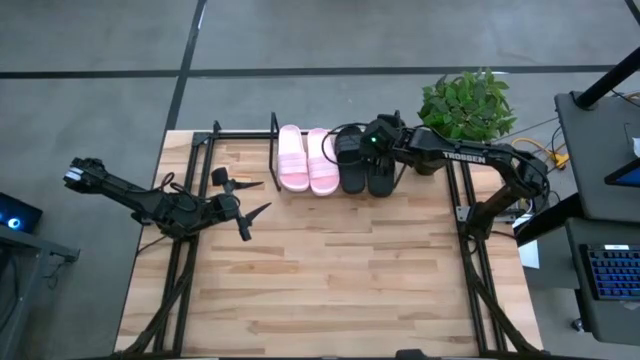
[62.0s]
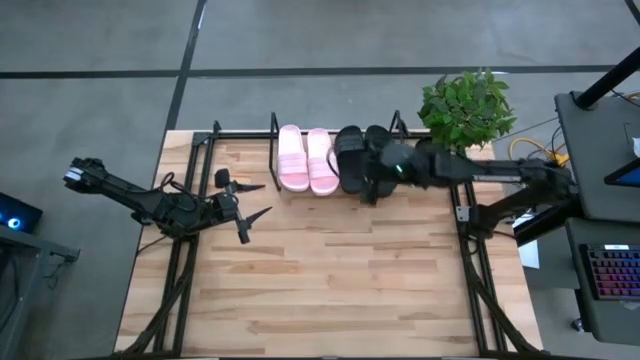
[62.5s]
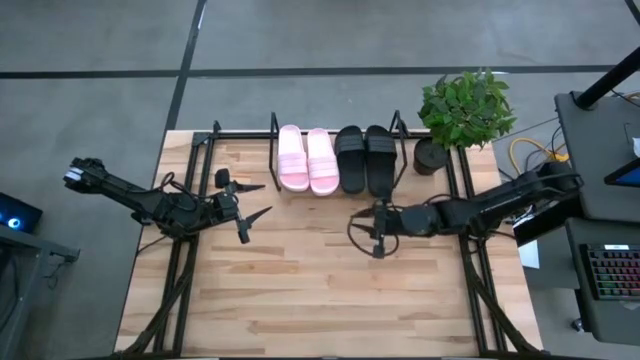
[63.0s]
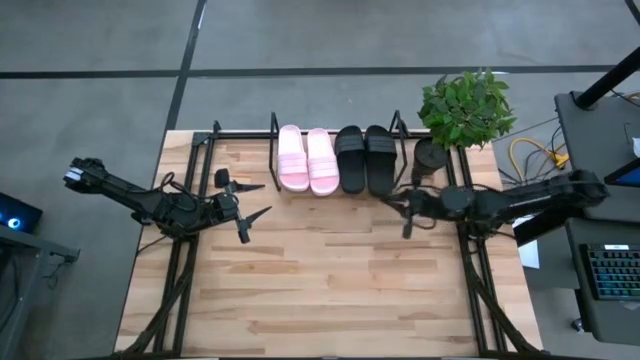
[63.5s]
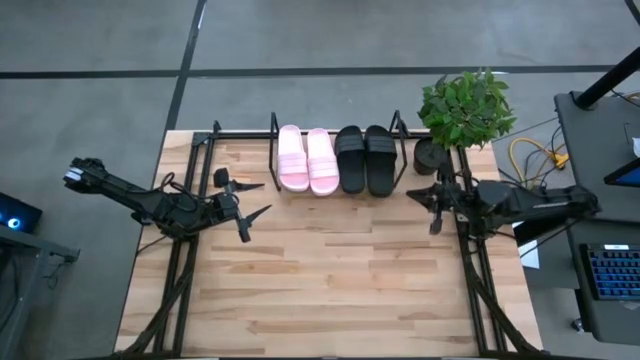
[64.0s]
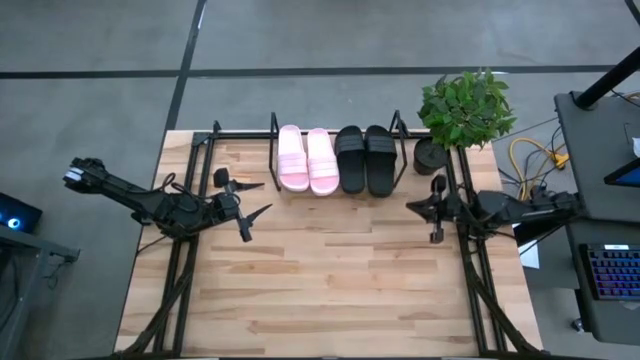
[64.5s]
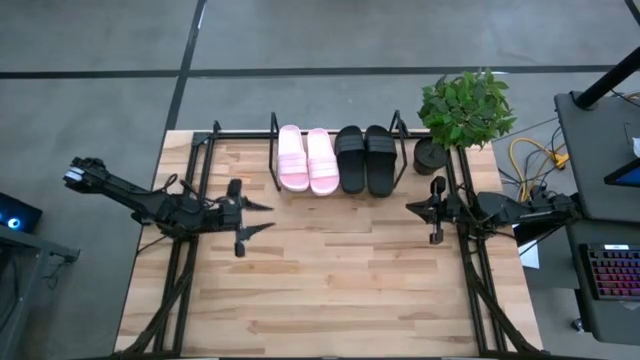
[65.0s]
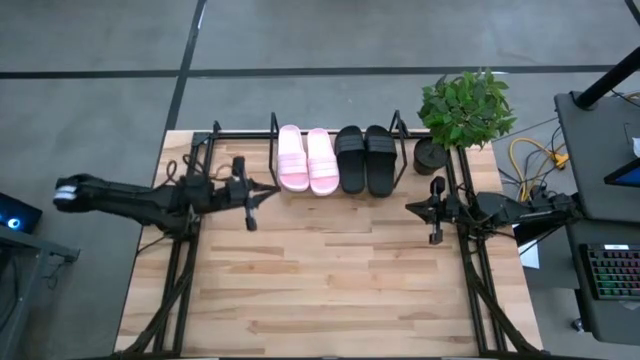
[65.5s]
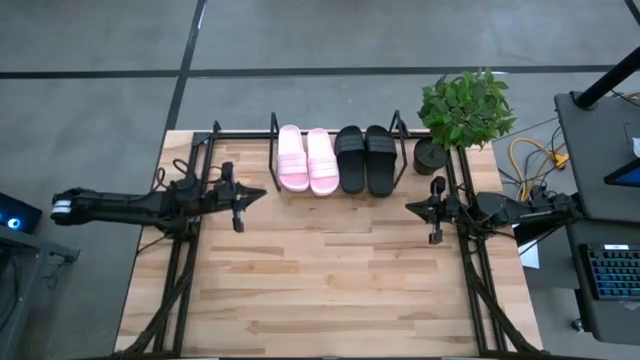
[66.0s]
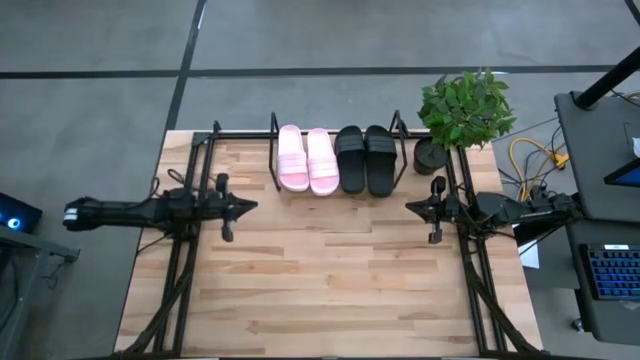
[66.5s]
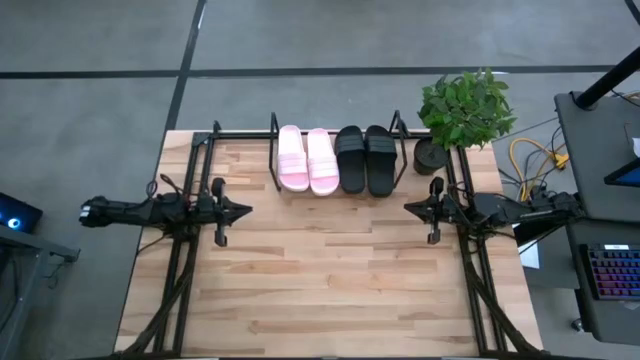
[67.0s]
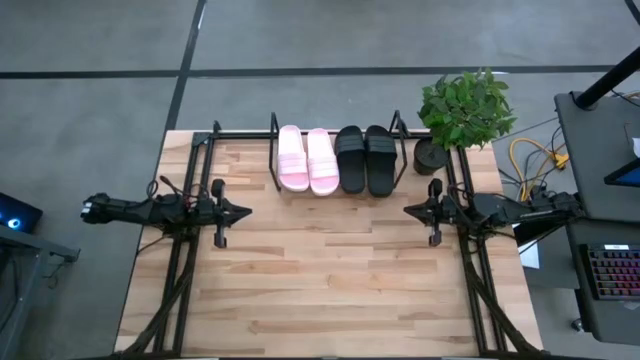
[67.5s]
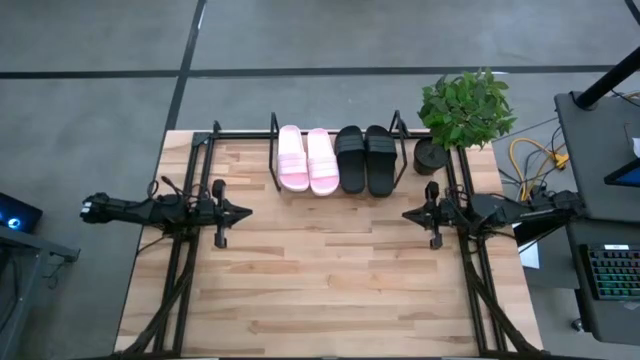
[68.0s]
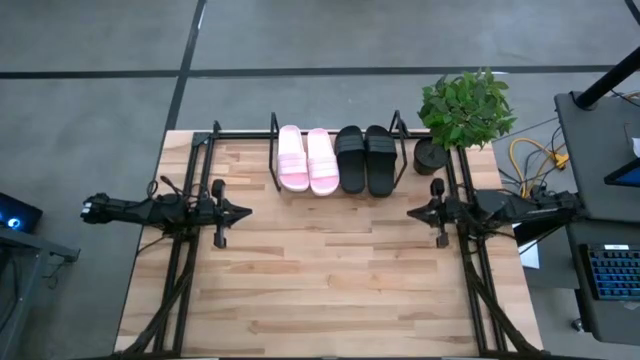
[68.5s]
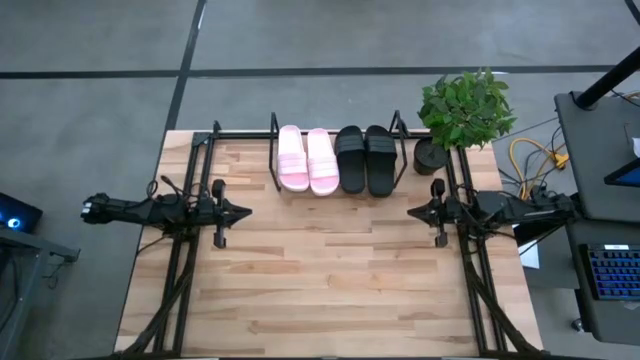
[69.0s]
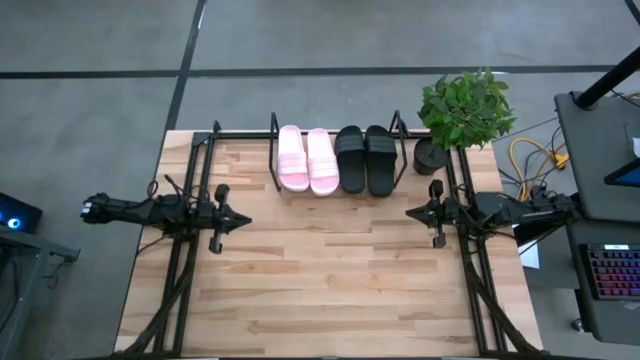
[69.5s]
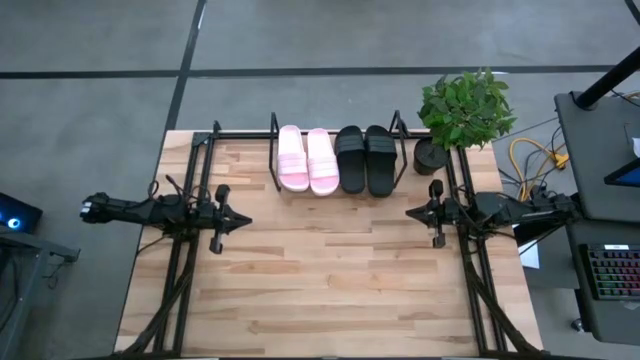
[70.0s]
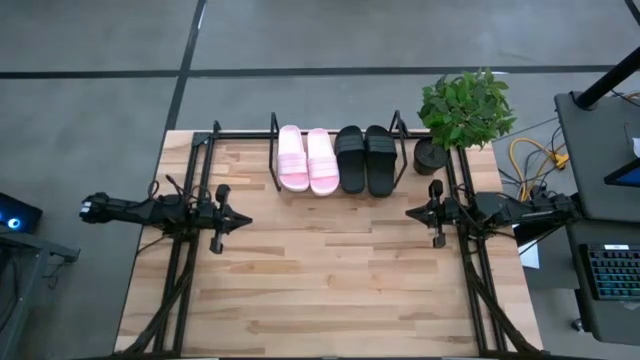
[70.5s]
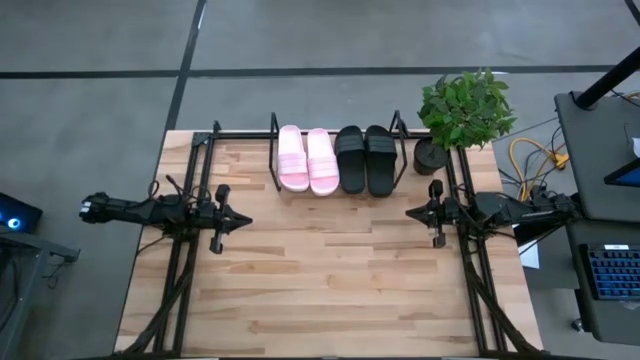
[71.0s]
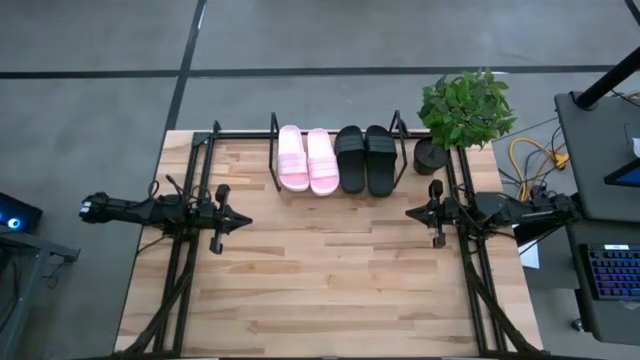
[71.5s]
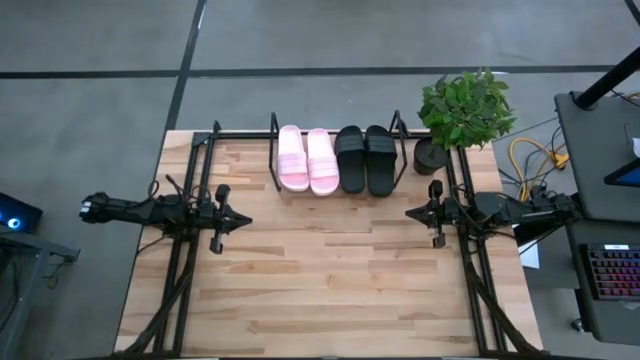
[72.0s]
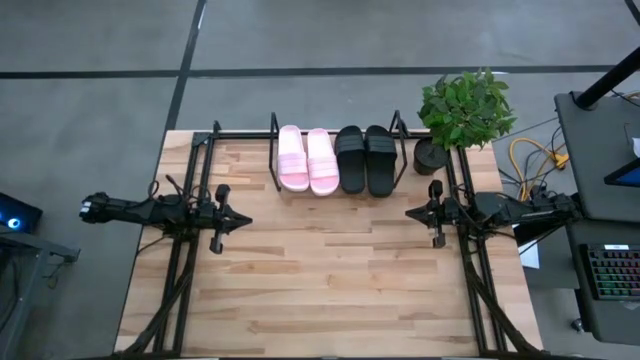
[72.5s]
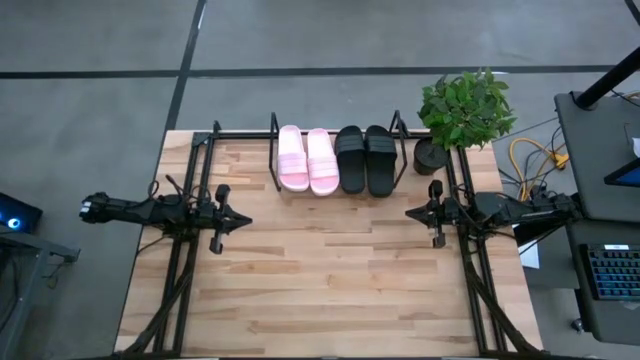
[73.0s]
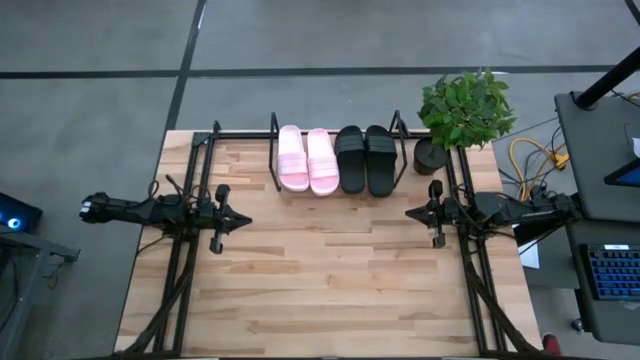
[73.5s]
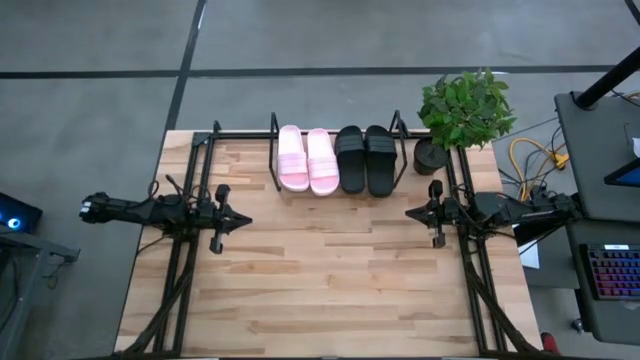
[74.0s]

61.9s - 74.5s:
Task: Pick and place slides into the shelf
Return to Home Position

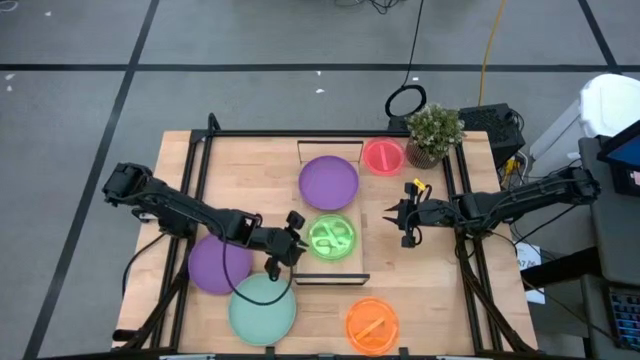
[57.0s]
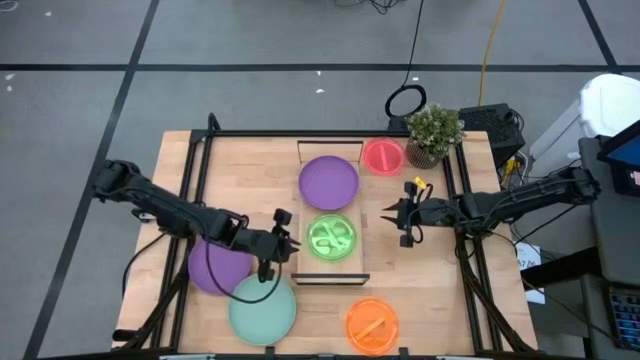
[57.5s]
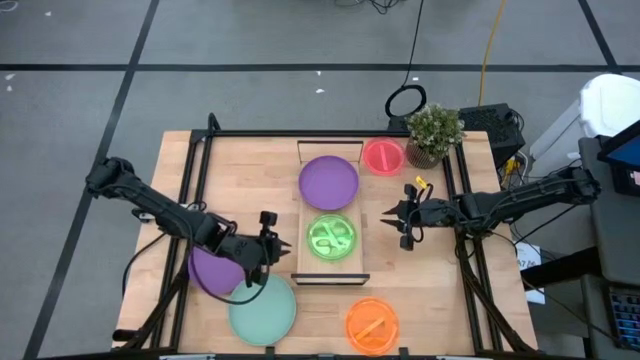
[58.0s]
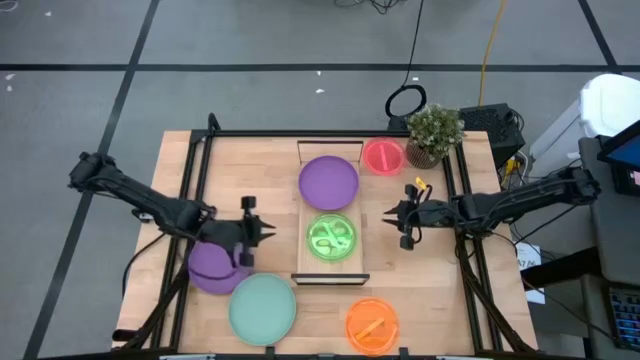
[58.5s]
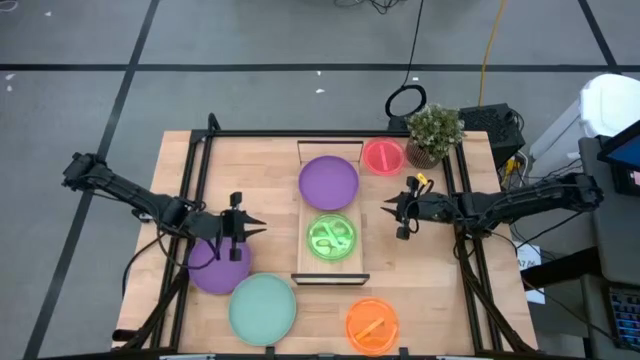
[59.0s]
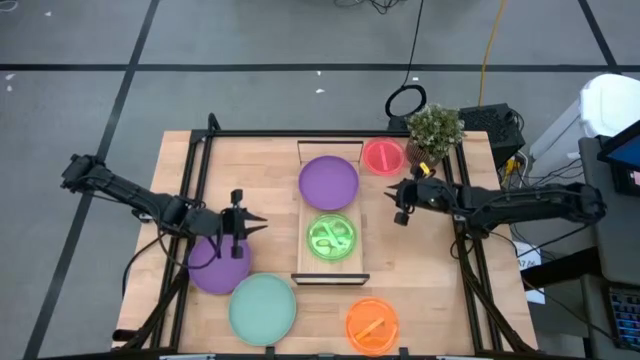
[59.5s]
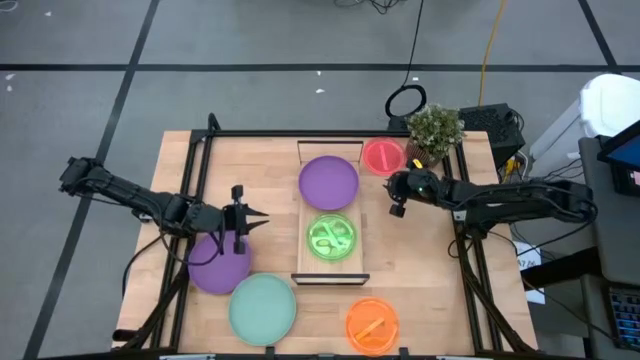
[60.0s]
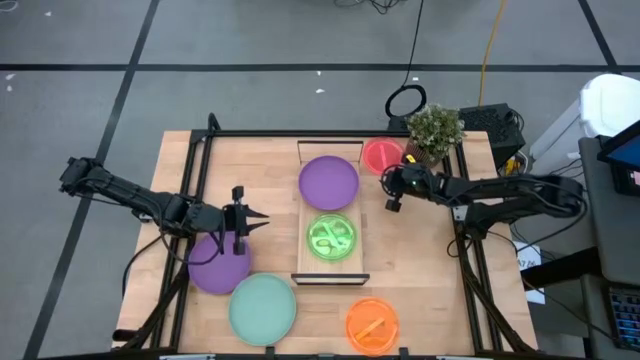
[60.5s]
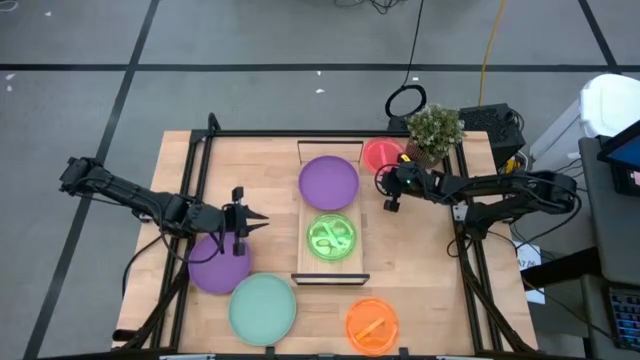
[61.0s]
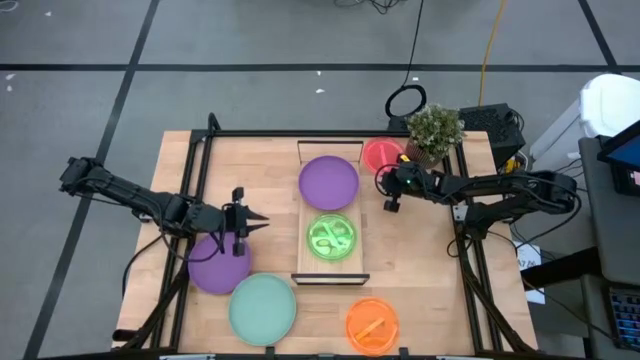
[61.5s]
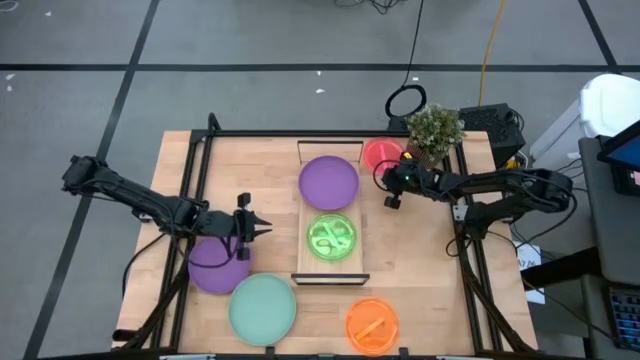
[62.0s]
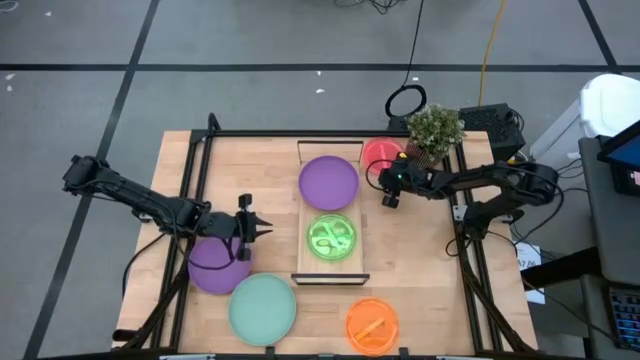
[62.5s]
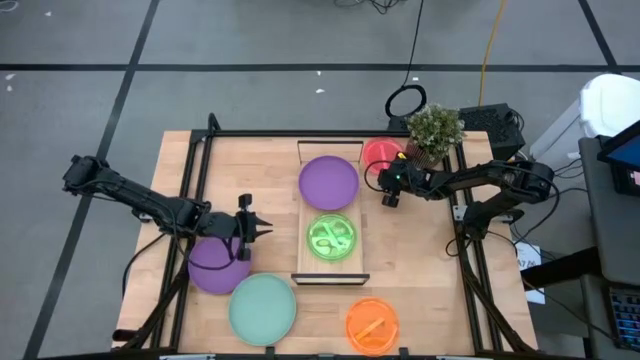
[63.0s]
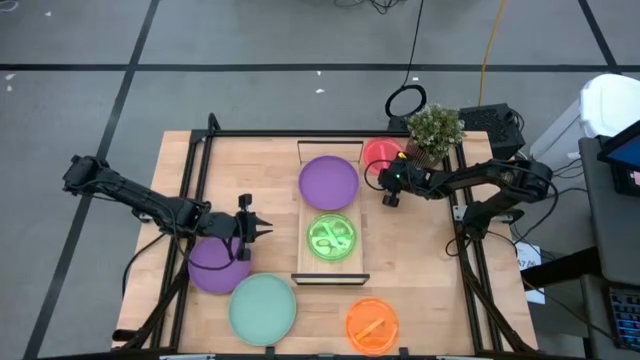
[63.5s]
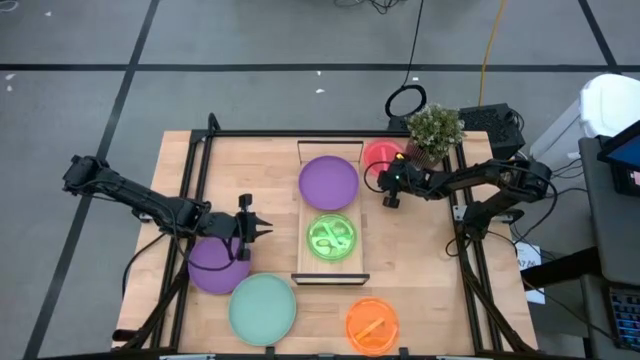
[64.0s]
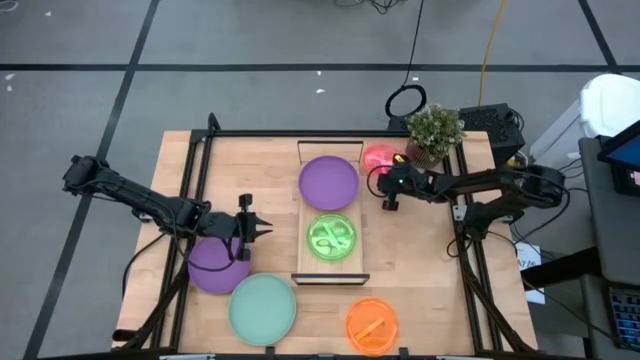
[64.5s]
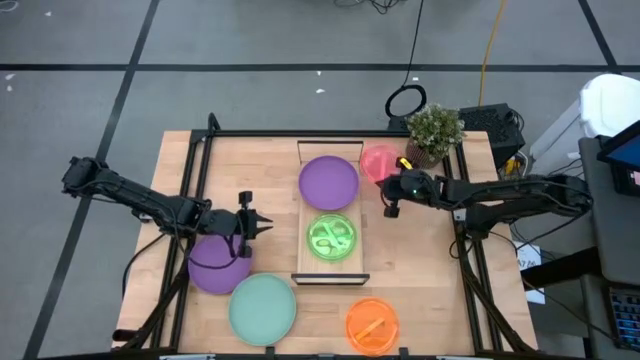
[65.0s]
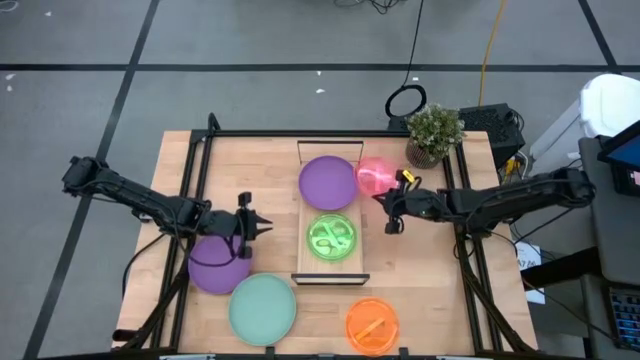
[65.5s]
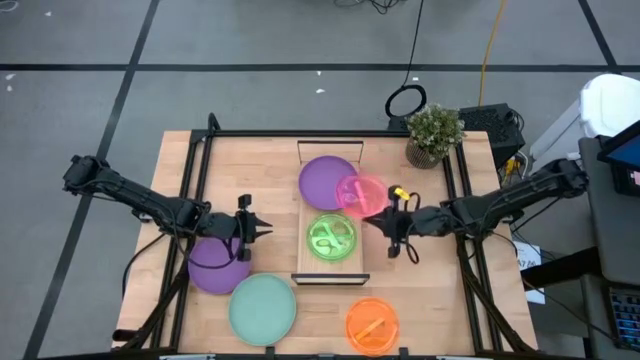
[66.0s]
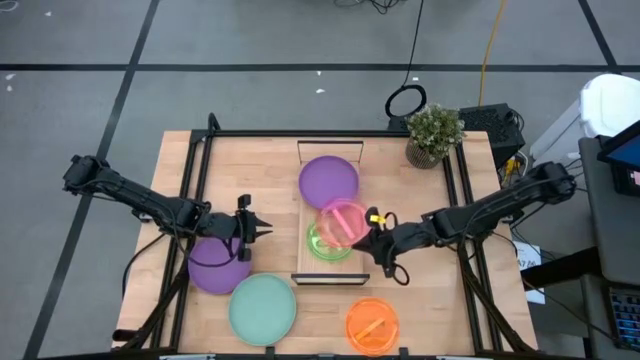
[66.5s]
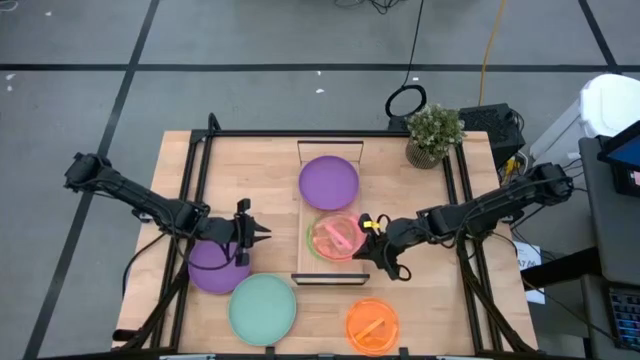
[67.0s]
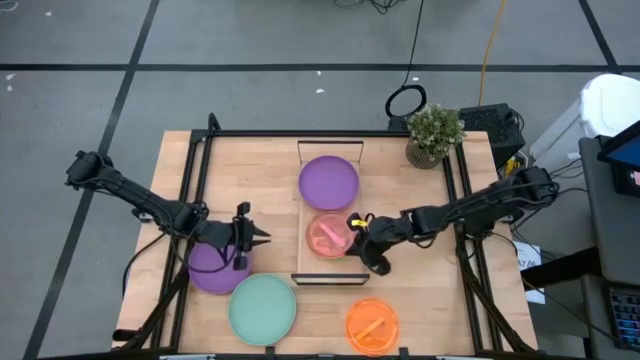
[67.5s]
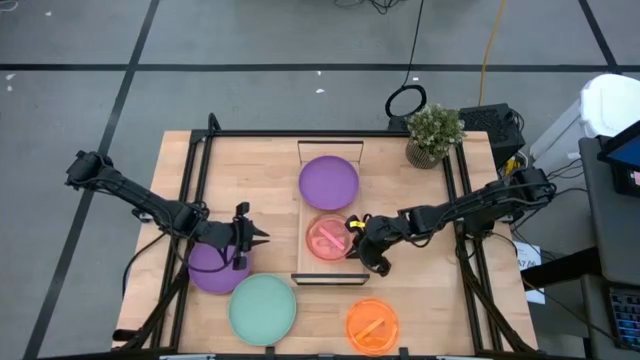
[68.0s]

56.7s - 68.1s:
Task: Place and stack plates onto a shelf
Stack the light pink plate on top of the green plate on the shelf
